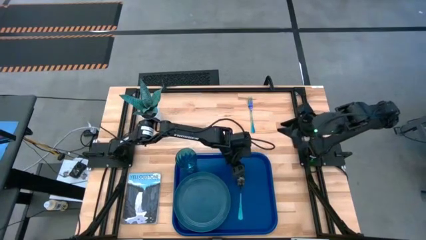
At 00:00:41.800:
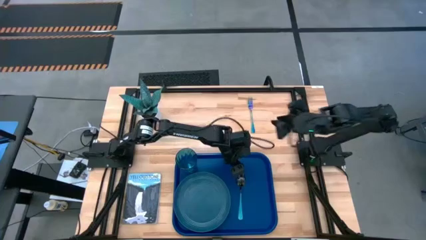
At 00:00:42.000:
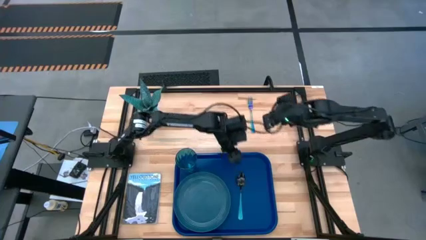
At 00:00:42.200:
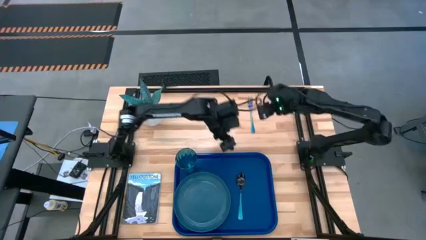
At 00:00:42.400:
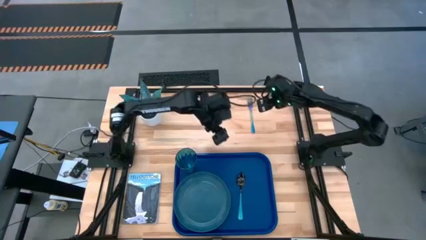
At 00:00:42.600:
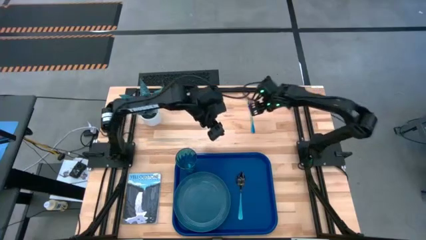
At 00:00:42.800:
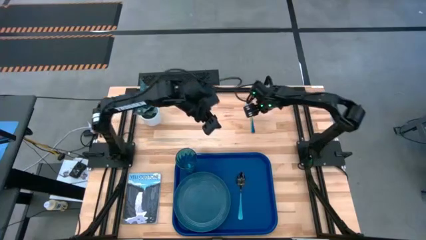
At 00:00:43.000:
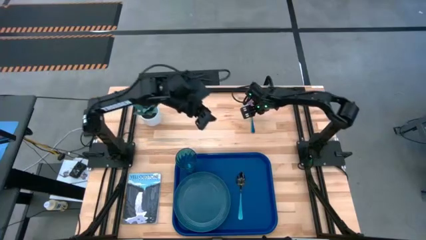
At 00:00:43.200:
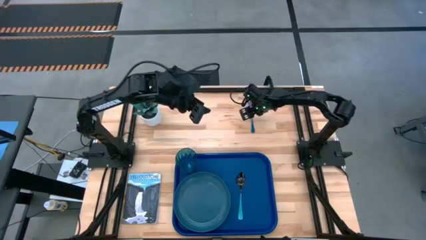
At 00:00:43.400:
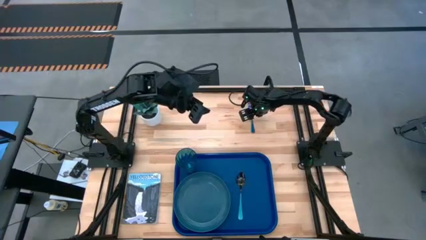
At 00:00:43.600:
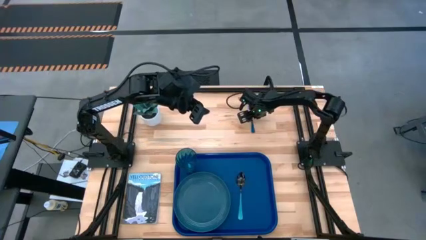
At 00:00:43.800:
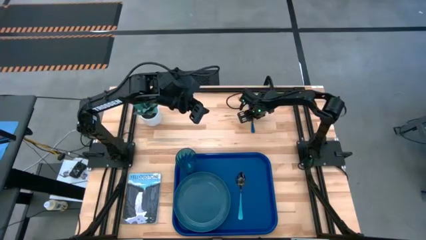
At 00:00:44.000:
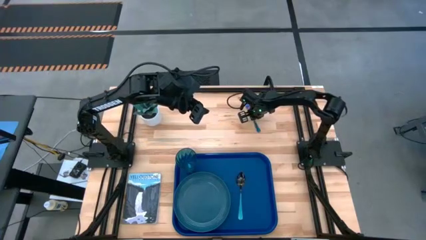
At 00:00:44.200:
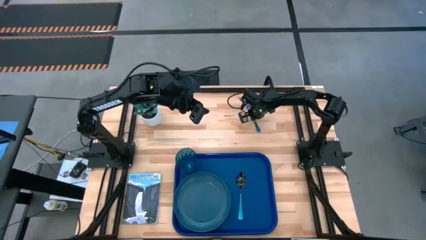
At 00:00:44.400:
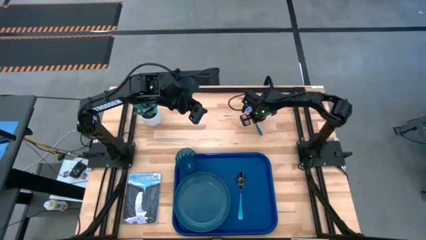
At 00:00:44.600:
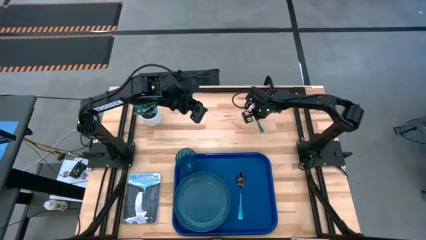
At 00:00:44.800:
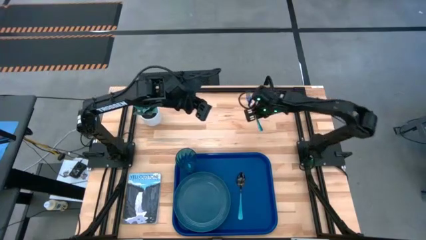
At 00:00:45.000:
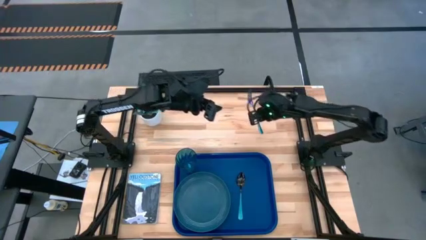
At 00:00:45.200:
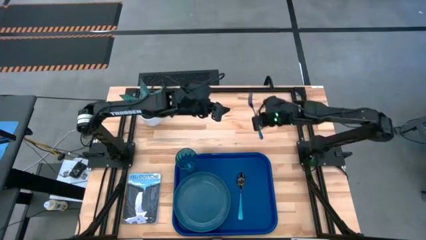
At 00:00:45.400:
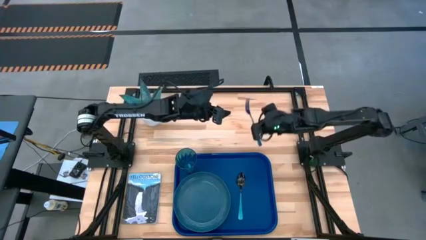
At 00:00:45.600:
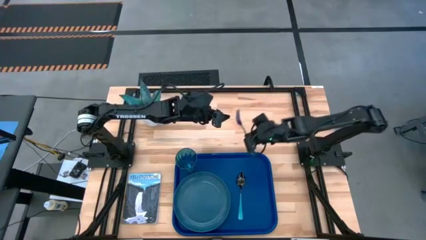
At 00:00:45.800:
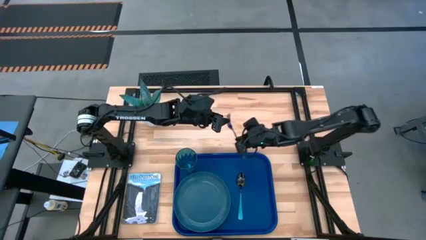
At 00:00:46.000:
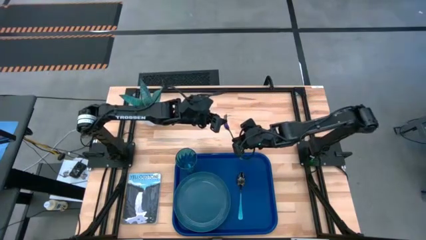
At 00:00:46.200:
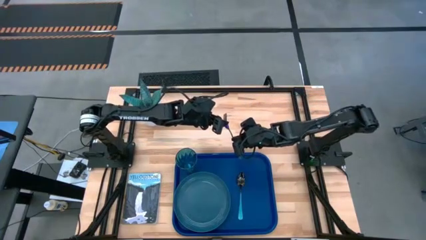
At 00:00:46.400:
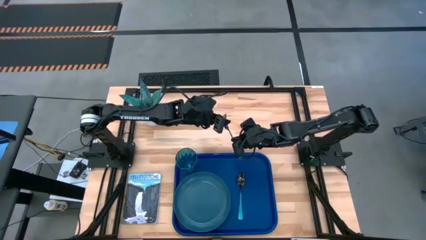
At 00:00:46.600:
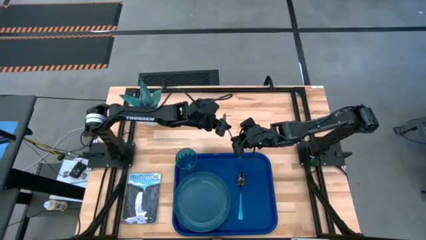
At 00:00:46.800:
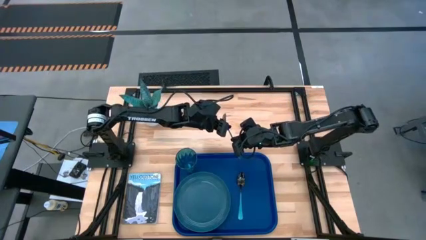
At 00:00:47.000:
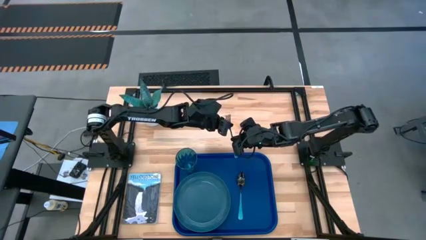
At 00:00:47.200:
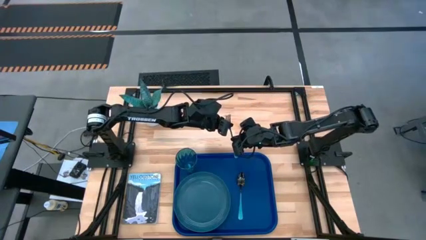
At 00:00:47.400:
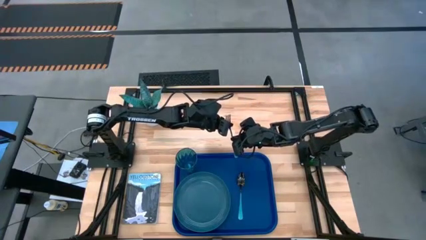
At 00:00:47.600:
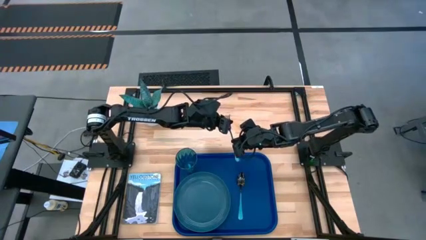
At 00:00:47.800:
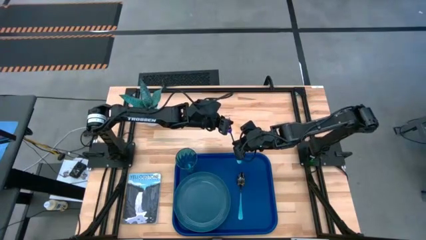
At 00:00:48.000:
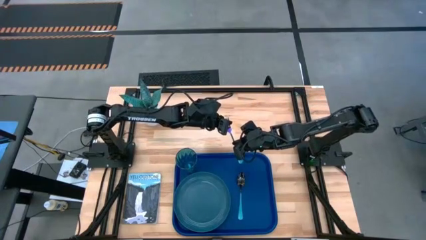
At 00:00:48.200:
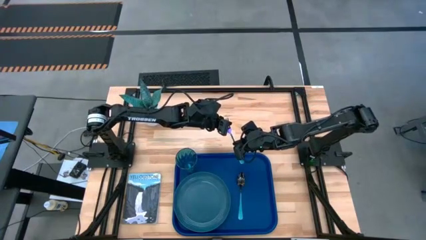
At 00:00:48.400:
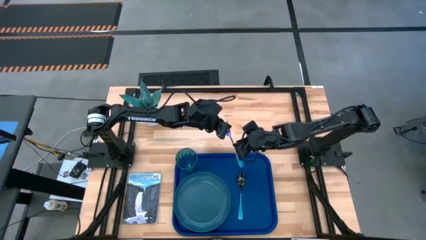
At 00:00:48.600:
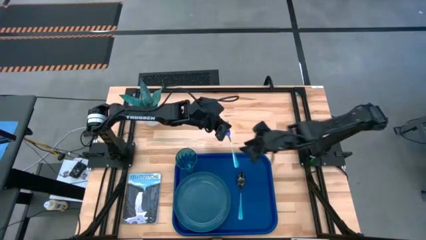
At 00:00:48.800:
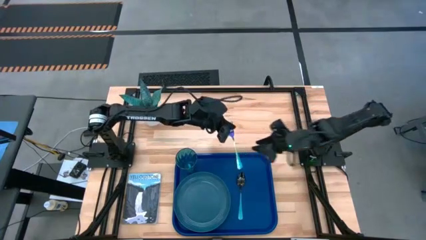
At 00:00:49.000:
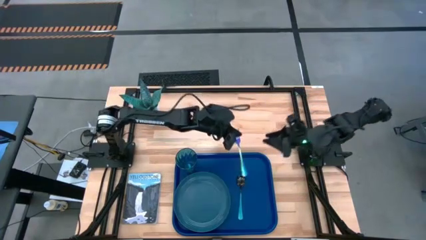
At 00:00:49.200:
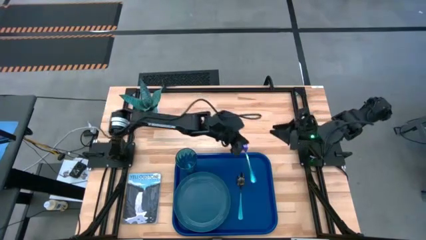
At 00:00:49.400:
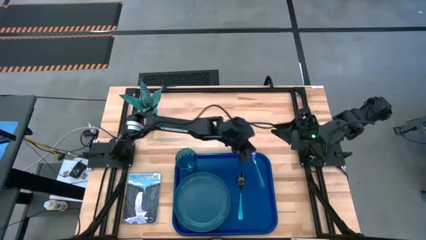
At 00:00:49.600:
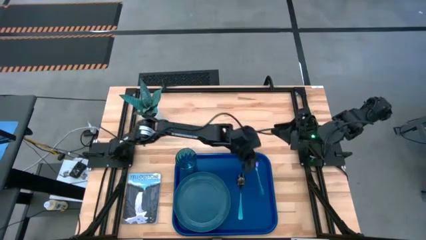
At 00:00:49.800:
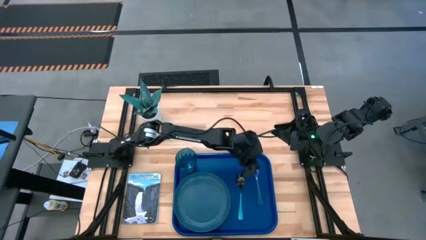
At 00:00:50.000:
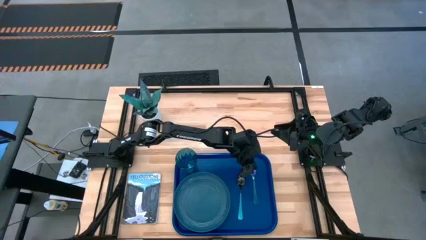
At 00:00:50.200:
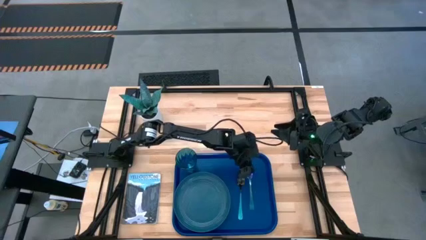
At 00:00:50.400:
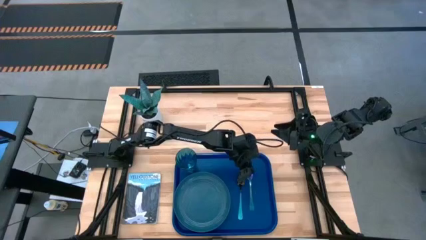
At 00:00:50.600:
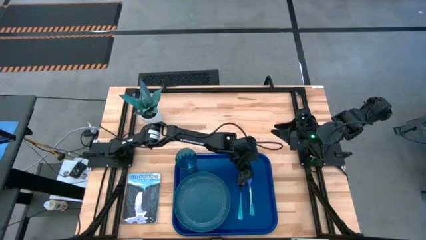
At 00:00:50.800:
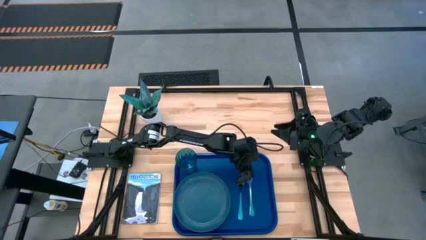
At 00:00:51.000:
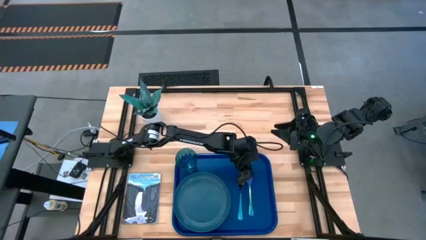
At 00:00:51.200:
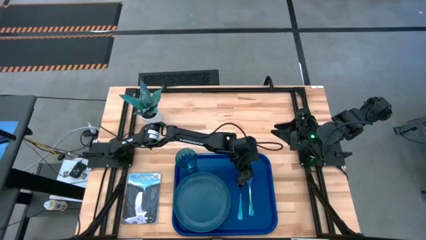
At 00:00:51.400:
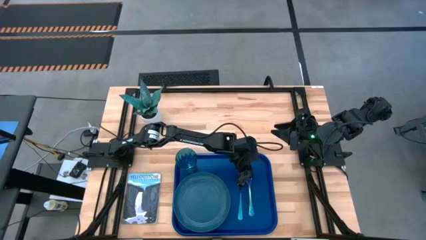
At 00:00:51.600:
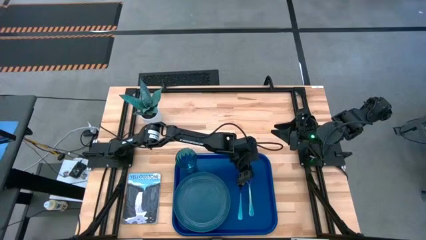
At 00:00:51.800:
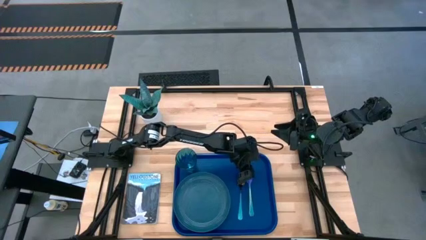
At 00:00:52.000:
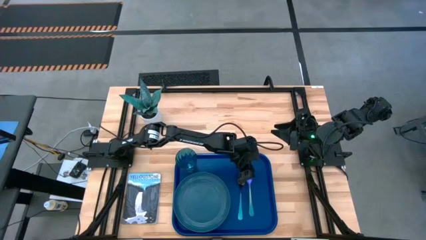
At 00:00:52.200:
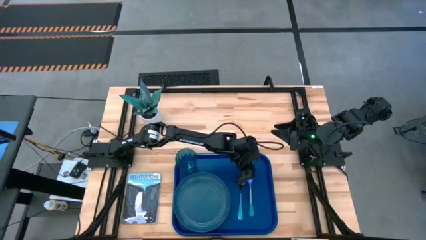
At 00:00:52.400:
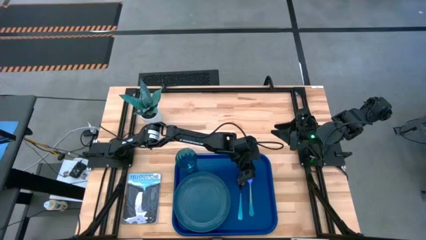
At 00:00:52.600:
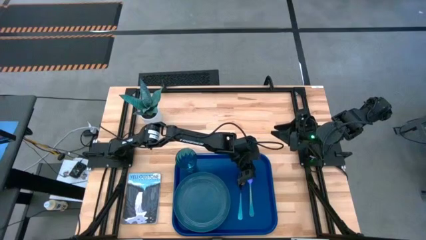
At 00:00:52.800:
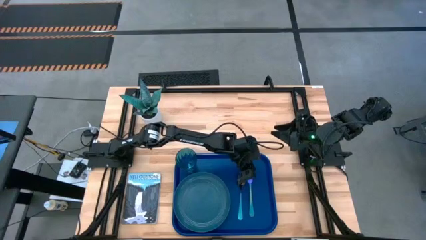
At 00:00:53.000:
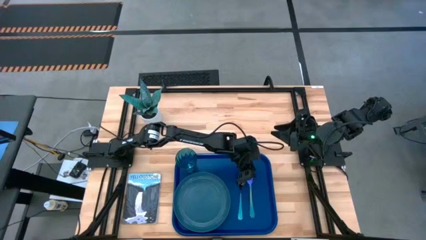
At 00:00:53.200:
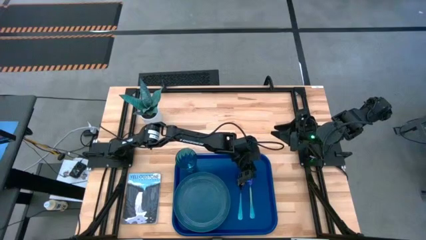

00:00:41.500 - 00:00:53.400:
Task: Pick and place plate/cup/fork/spoon on tray
Put the blue fork on the blue serving tray to the right of the blue spoon
